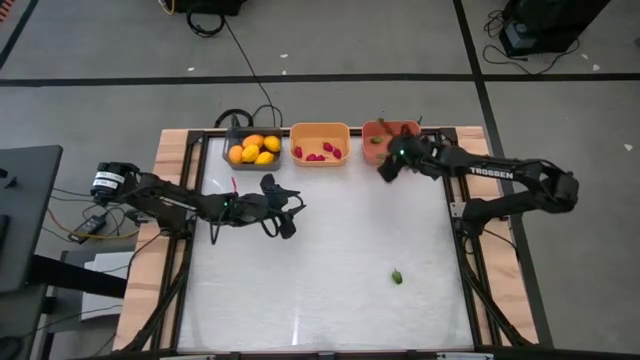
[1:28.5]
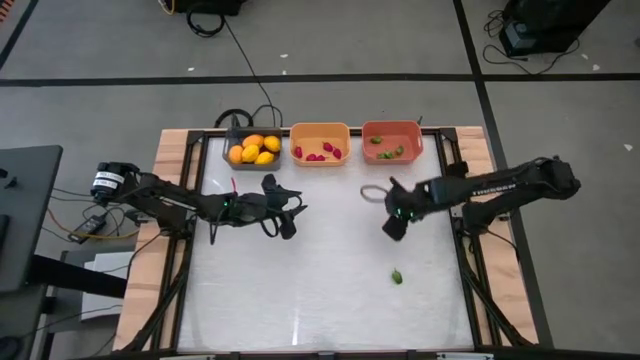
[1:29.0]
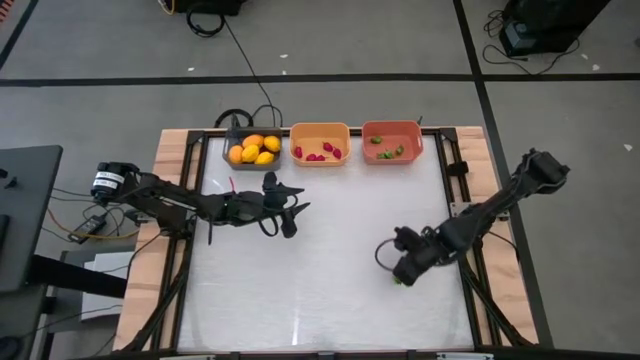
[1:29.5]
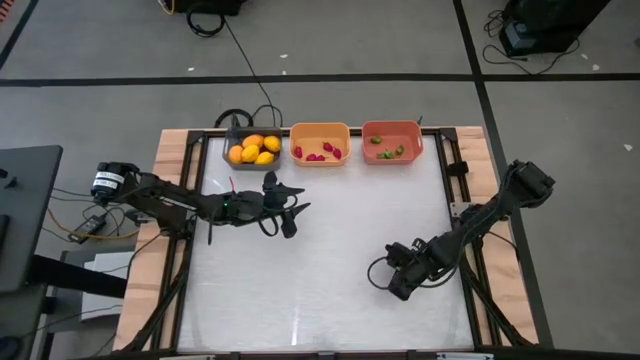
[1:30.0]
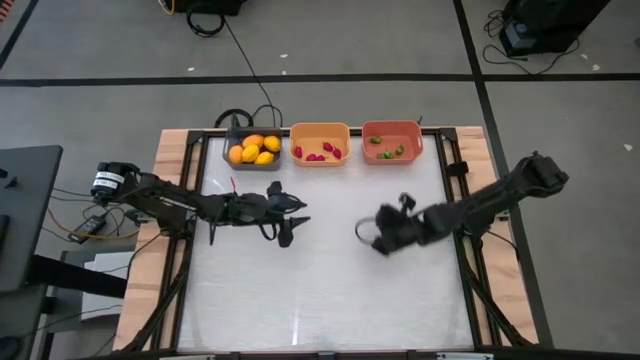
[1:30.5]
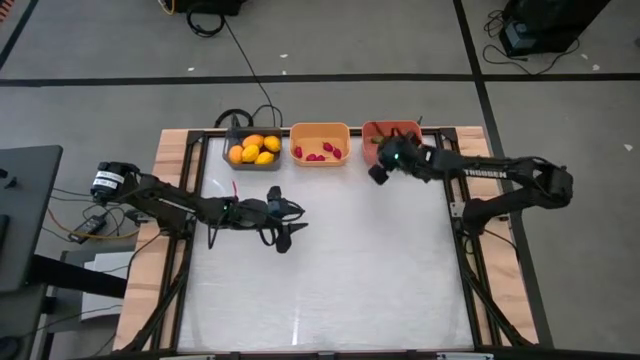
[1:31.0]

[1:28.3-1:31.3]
Task: Sort produce into baskets
Put the green chili pepper into the orange bin

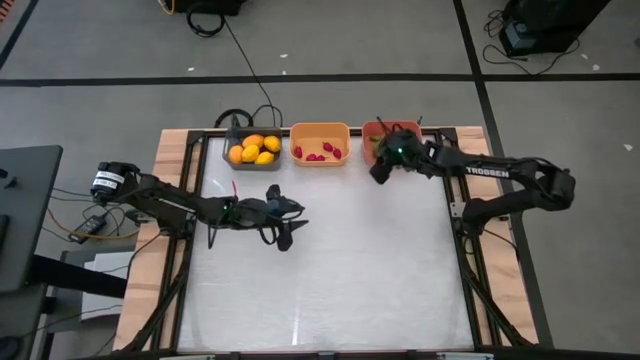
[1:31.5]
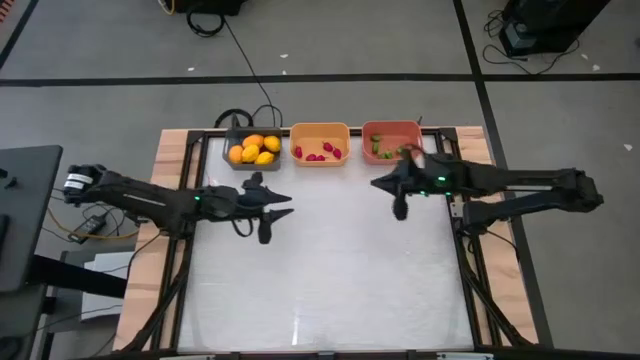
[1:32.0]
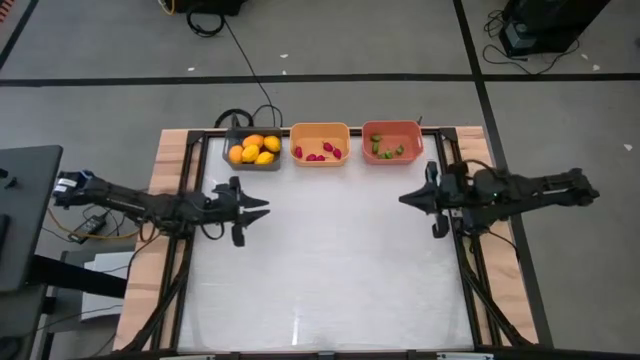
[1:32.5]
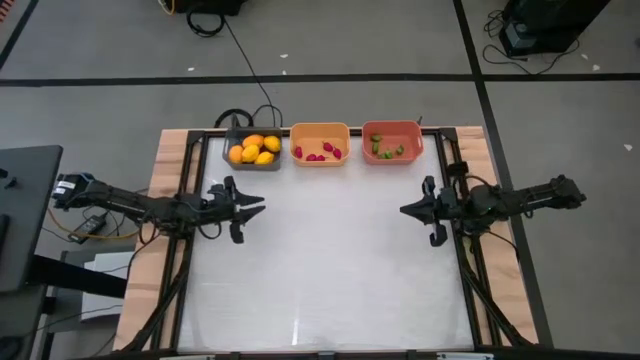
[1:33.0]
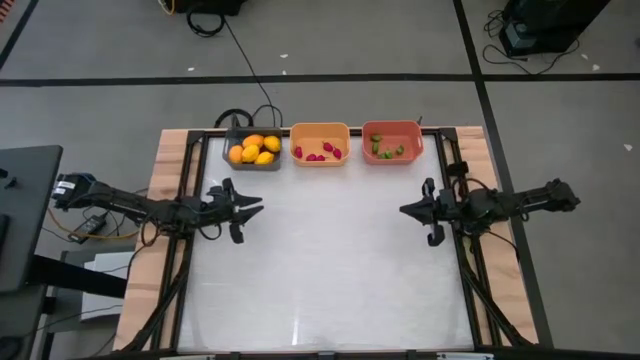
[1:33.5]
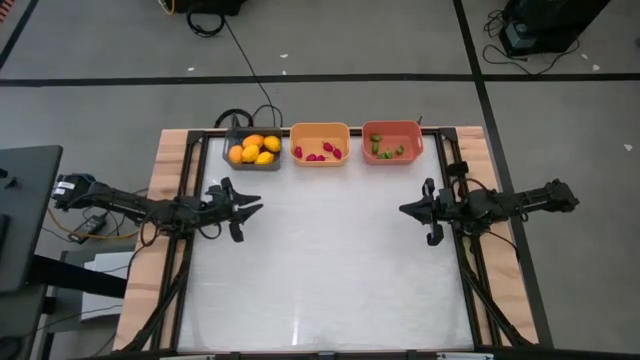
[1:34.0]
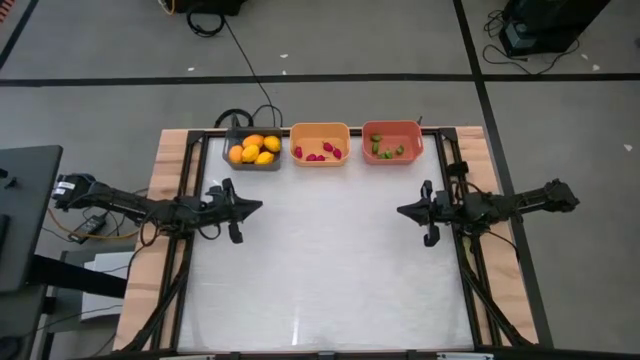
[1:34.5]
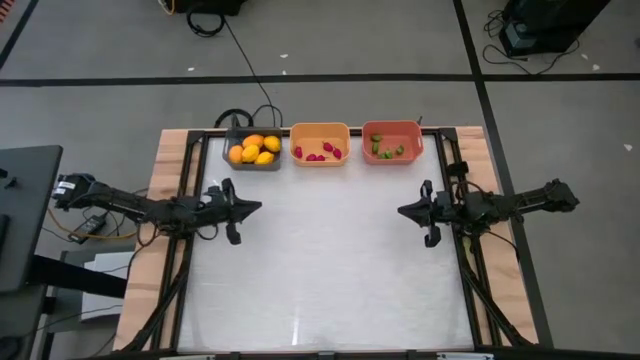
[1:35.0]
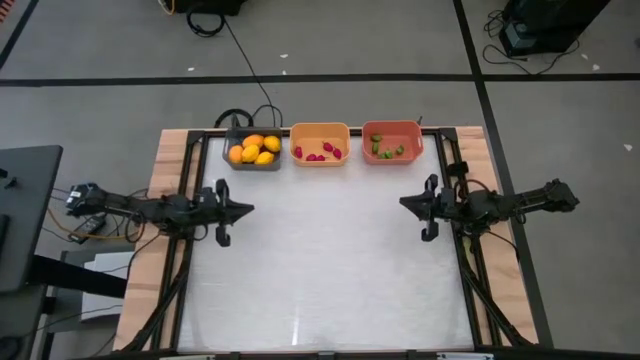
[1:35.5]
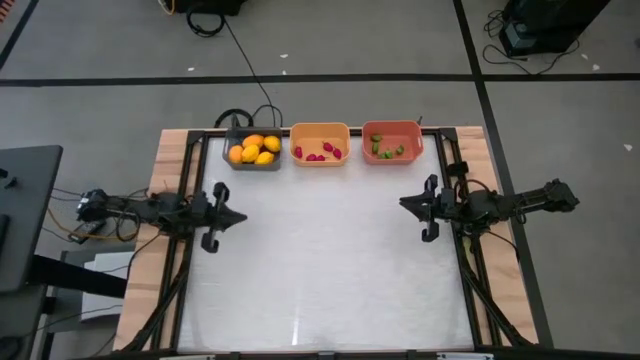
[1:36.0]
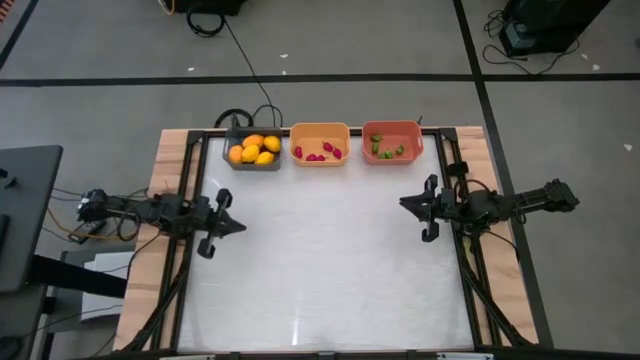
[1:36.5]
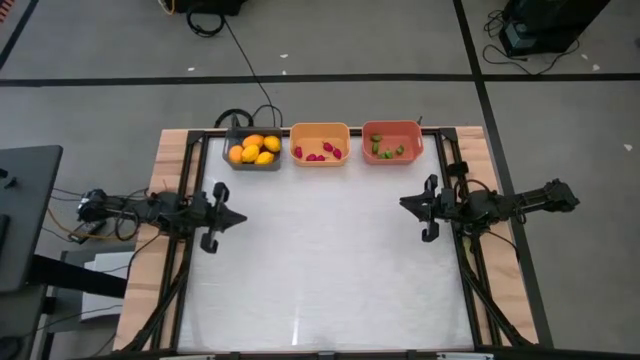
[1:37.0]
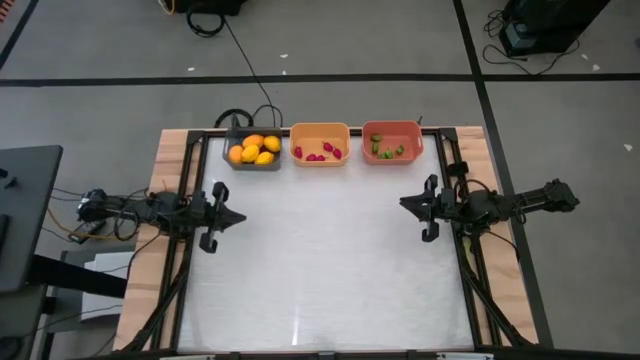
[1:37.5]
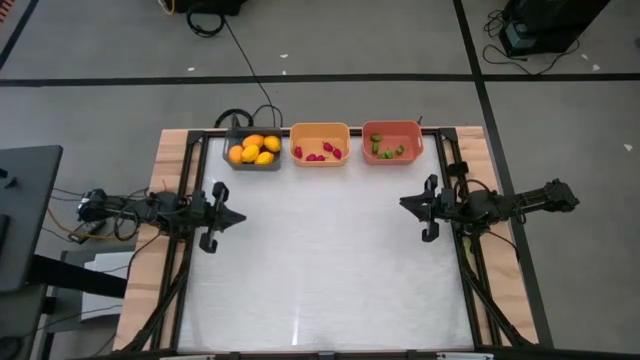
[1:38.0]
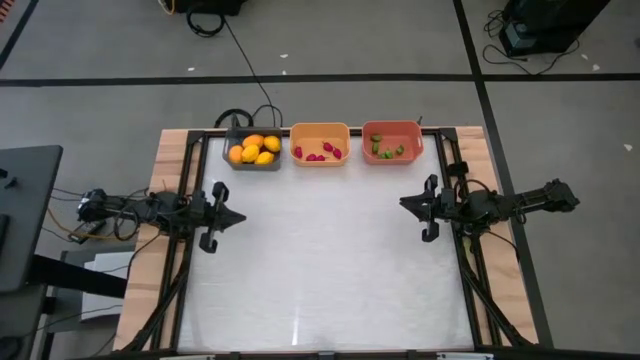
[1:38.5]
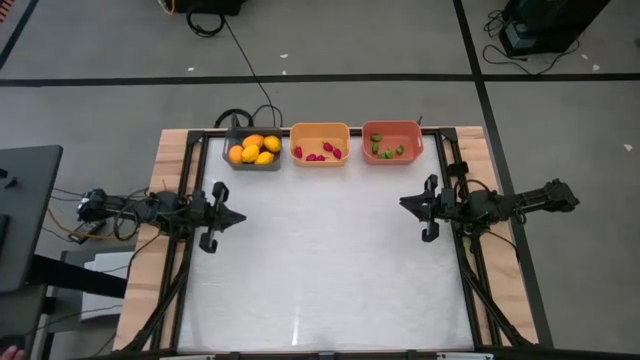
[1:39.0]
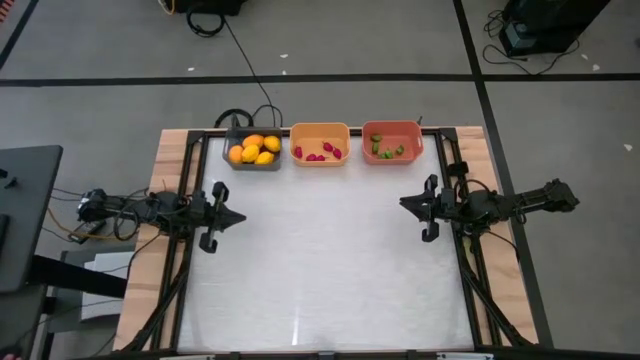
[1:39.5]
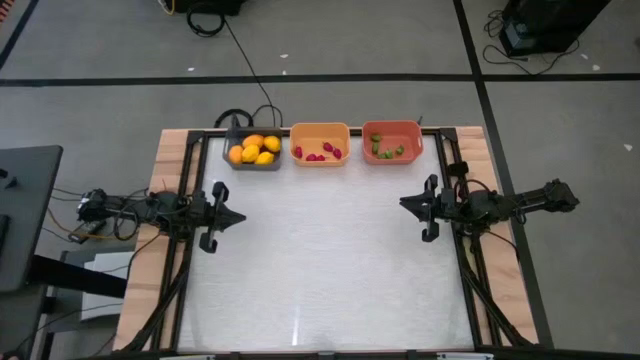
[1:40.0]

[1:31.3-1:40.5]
Return to Home position

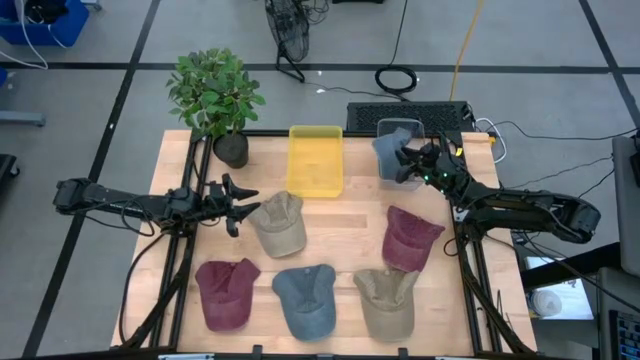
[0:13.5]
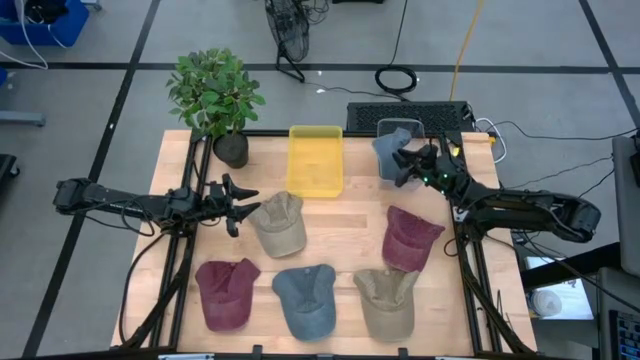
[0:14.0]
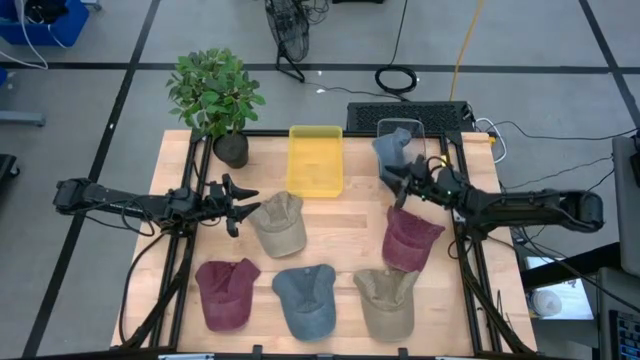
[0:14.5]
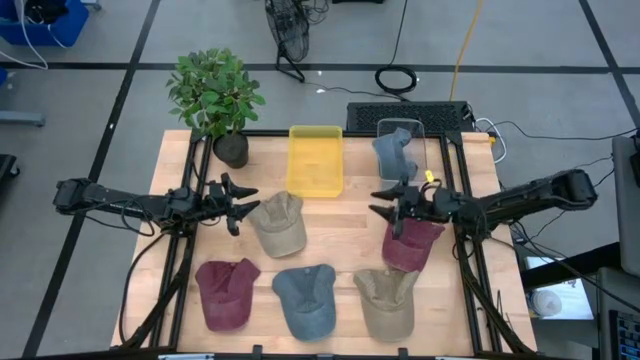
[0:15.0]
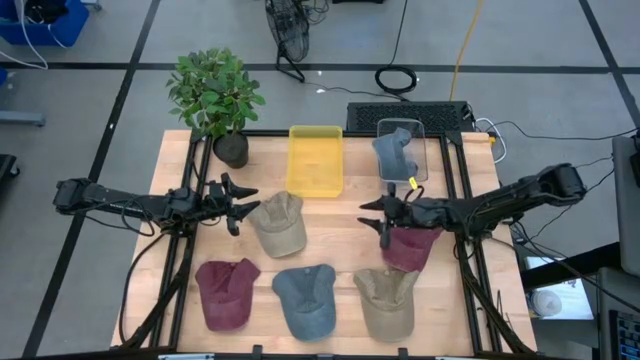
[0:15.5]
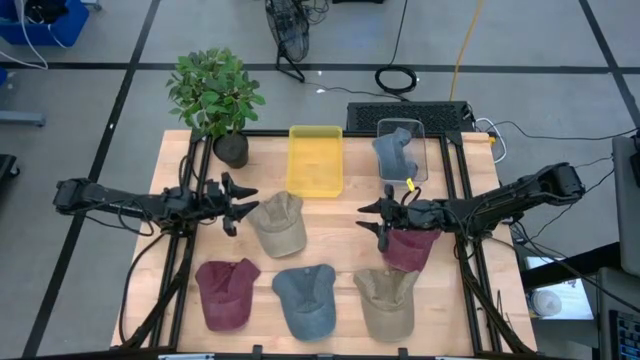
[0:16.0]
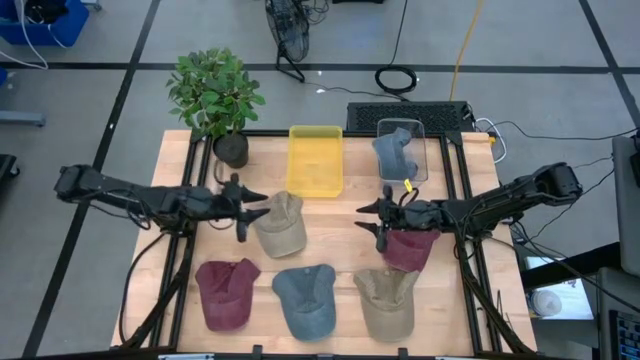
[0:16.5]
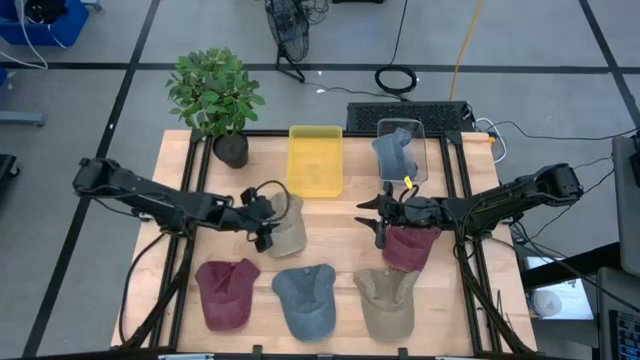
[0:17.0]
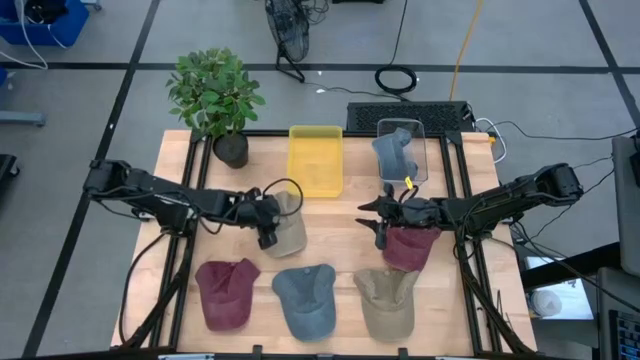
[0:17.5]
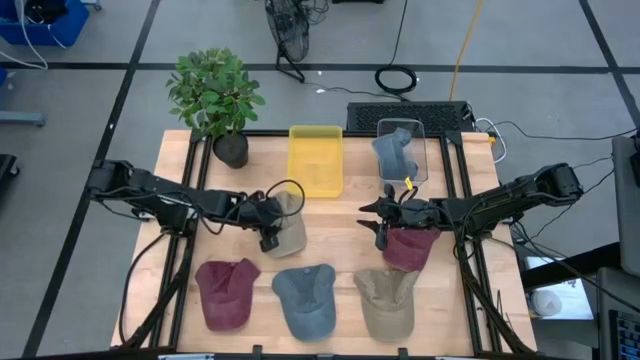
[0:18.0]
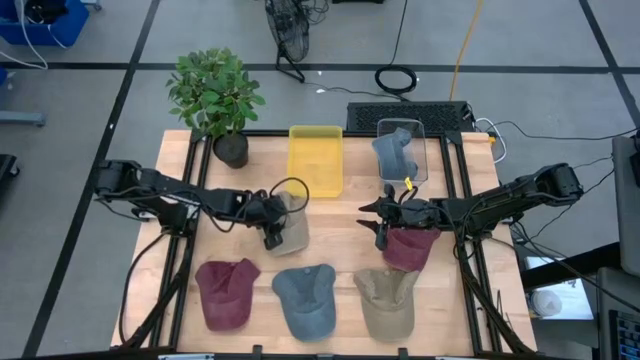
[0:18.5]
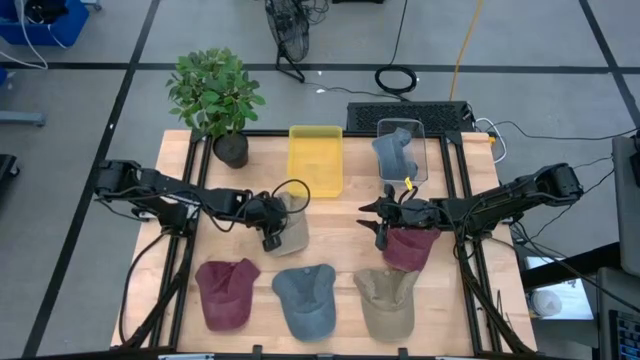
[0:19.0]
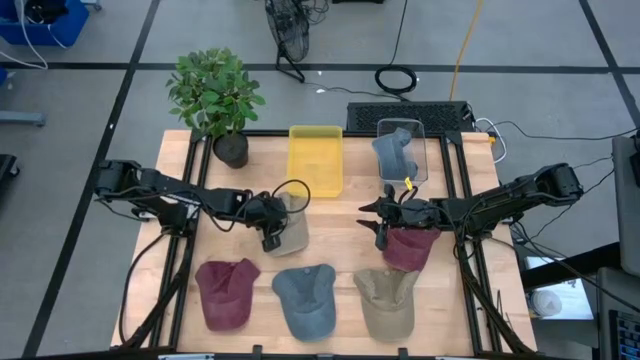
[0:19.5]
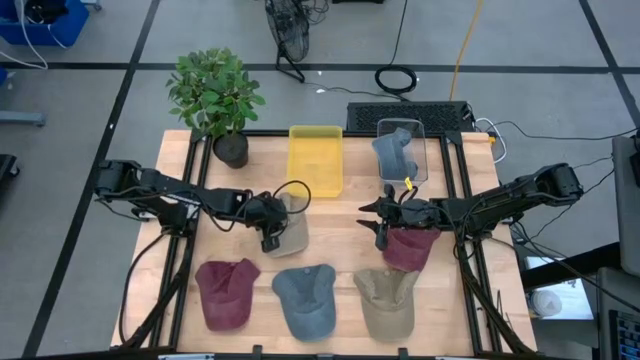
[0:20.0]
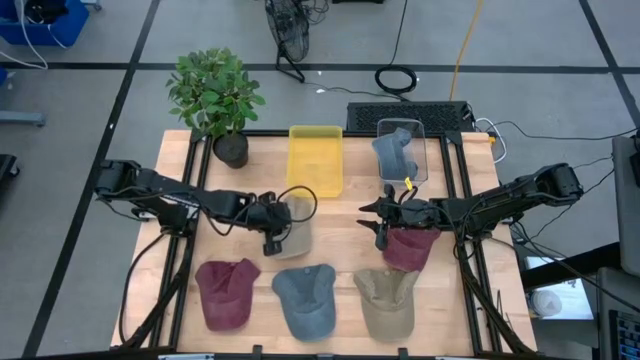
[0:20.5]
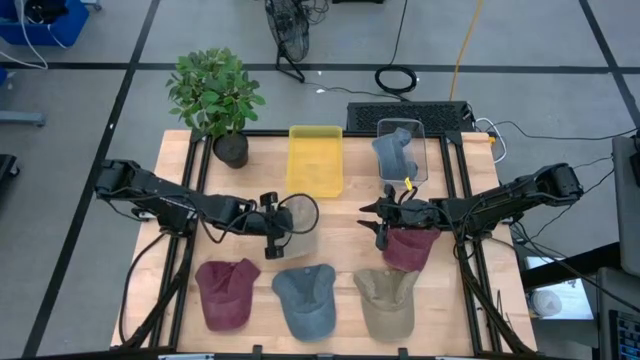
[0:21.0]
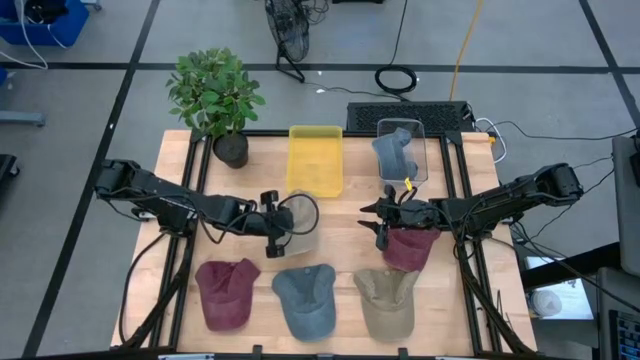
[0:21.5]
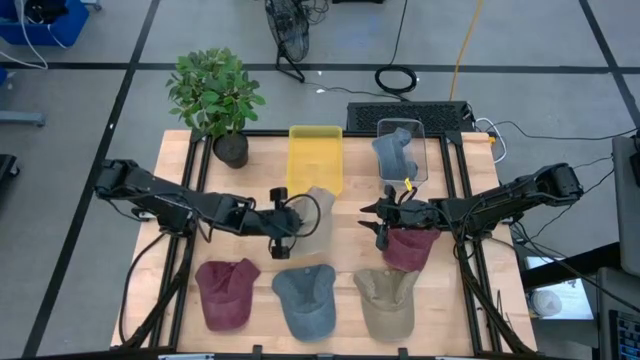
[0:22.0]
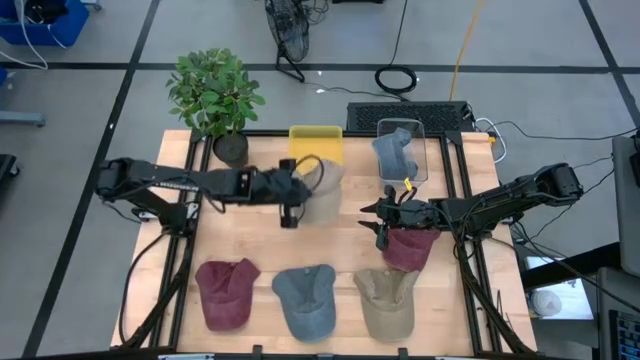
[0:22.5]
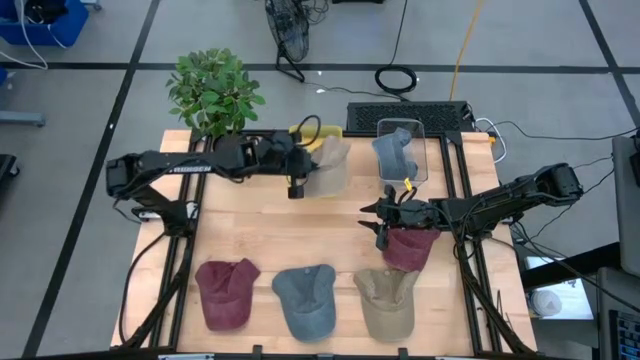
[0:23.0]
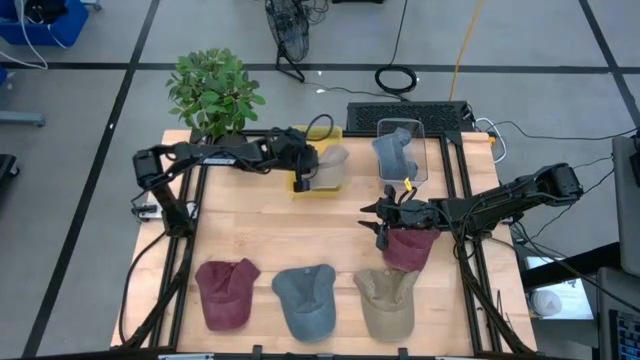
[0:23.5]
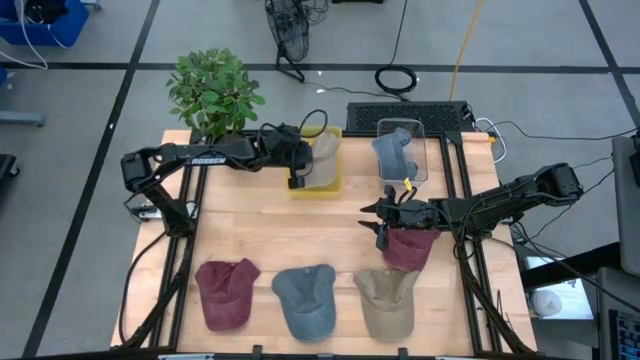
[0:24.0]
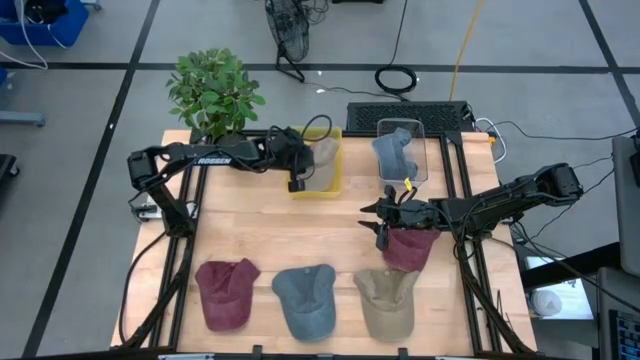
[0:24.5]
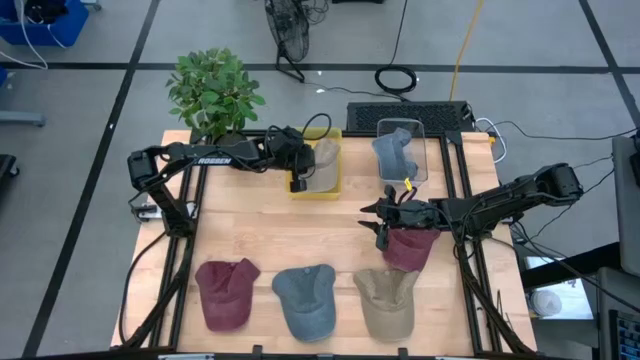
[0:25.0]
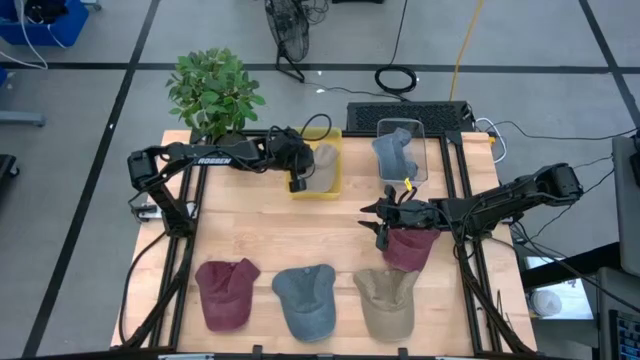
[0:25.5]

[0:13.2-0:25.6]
Task: Pick & Place hat
Put the top light brown cap into the yellow bin
